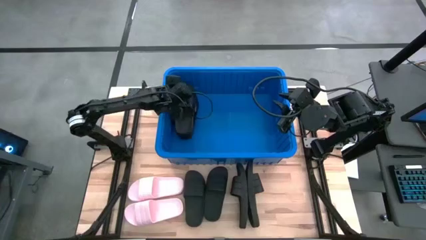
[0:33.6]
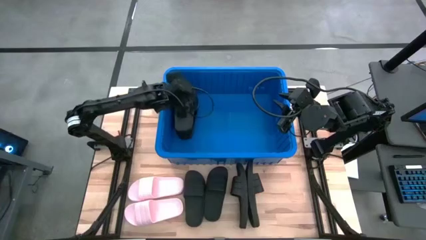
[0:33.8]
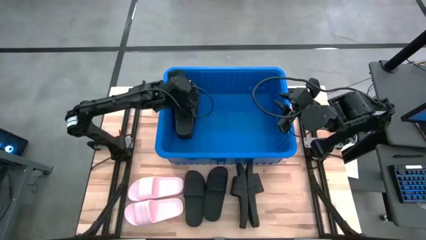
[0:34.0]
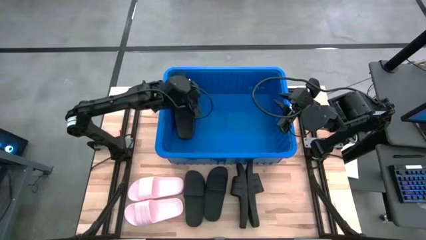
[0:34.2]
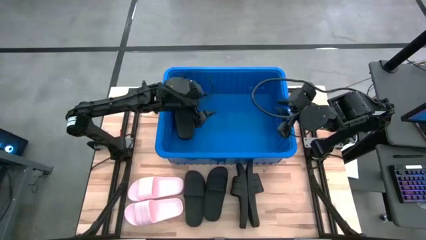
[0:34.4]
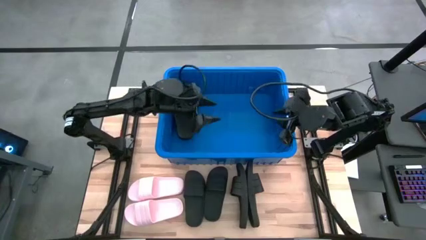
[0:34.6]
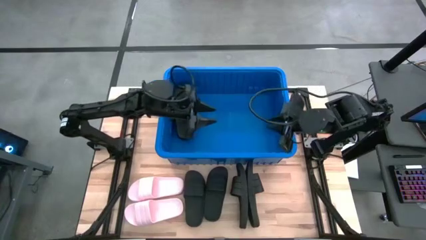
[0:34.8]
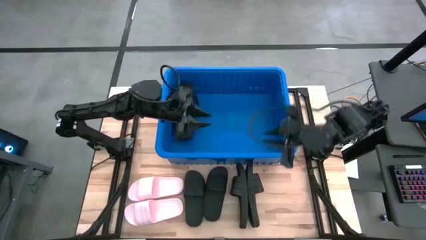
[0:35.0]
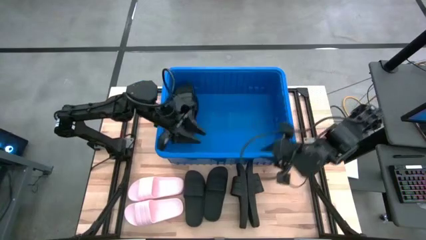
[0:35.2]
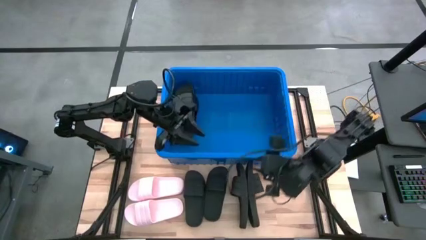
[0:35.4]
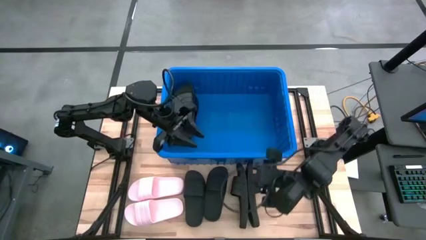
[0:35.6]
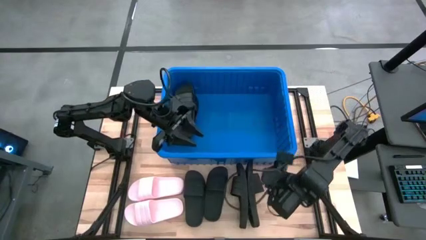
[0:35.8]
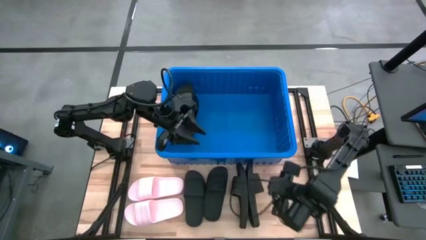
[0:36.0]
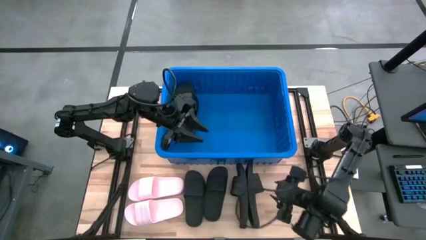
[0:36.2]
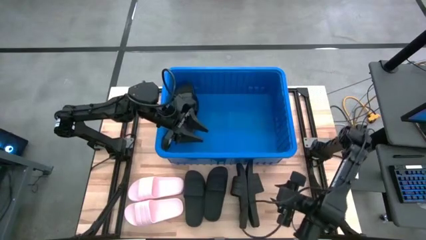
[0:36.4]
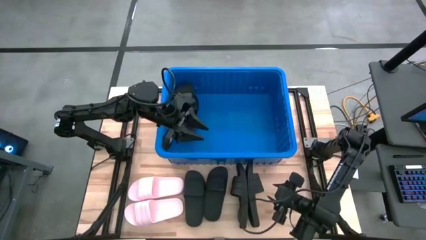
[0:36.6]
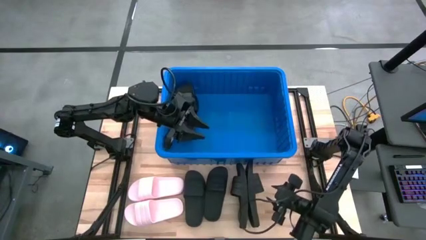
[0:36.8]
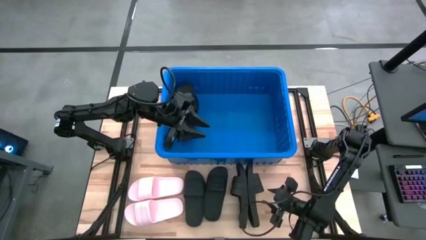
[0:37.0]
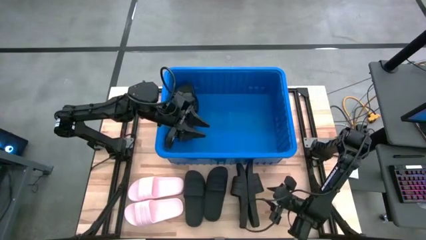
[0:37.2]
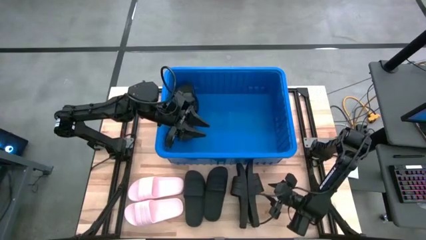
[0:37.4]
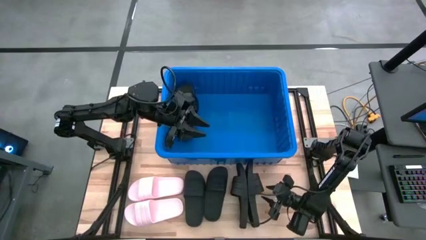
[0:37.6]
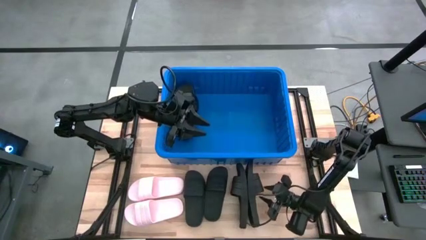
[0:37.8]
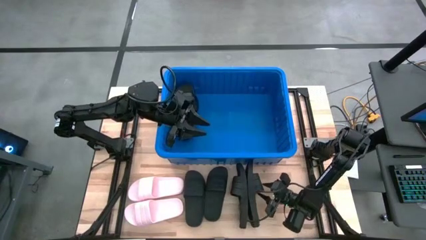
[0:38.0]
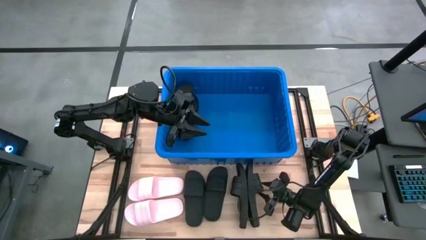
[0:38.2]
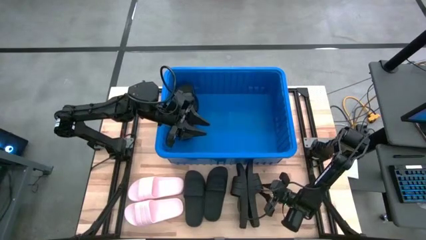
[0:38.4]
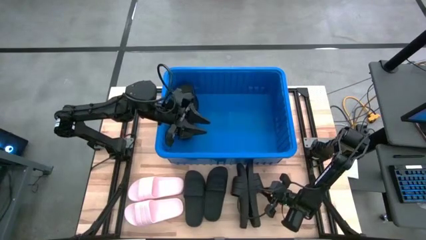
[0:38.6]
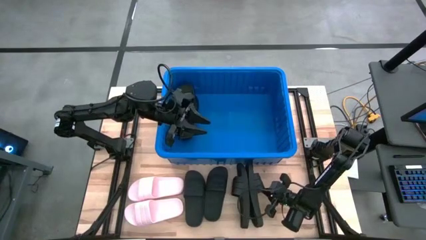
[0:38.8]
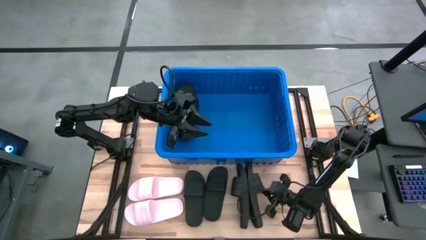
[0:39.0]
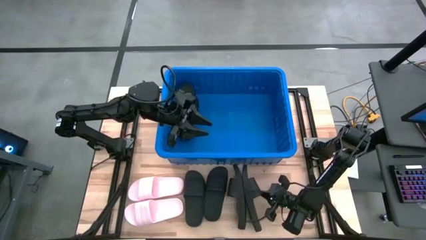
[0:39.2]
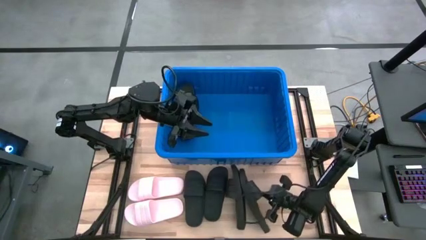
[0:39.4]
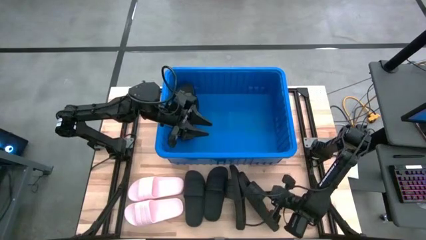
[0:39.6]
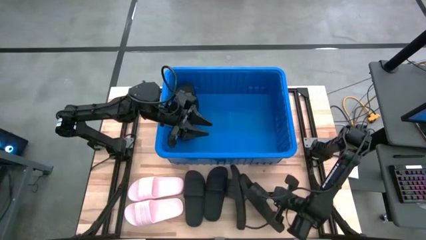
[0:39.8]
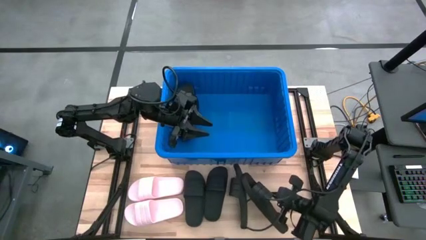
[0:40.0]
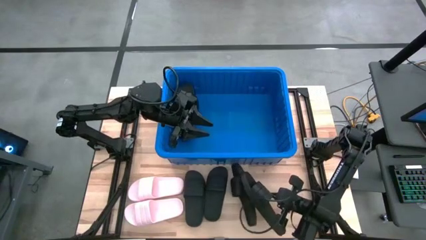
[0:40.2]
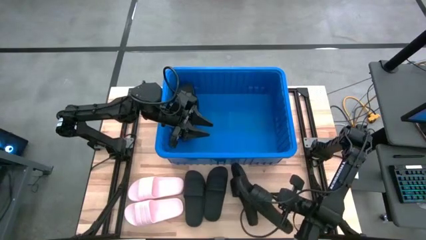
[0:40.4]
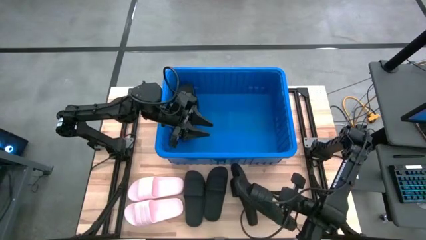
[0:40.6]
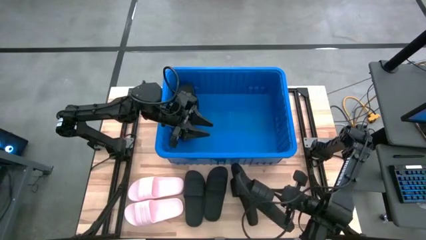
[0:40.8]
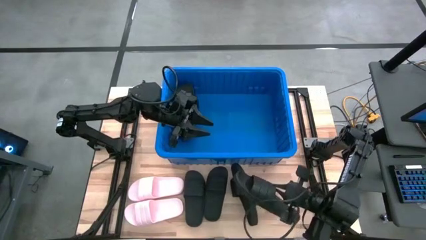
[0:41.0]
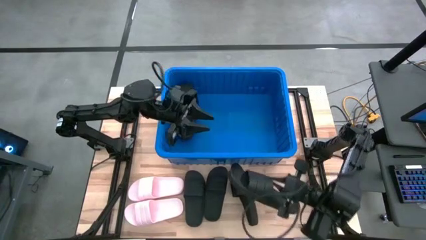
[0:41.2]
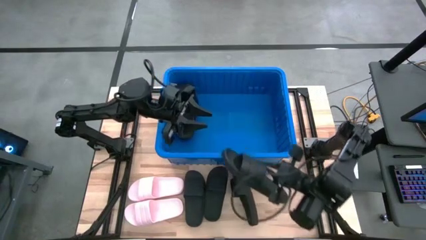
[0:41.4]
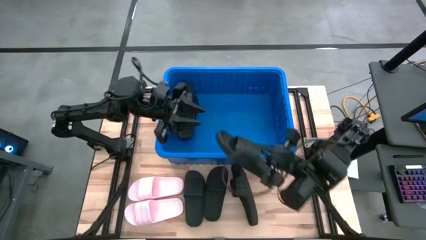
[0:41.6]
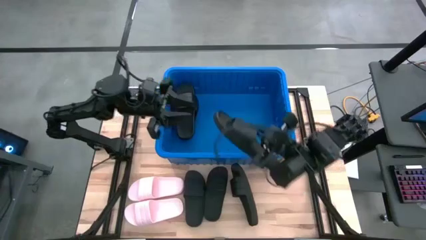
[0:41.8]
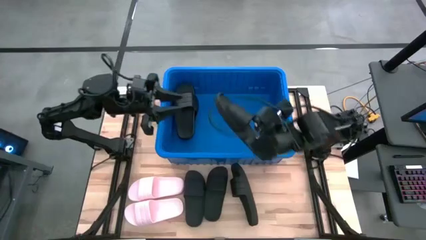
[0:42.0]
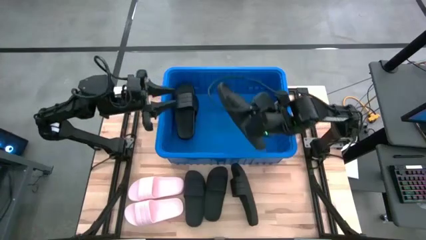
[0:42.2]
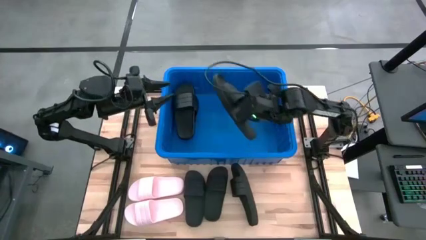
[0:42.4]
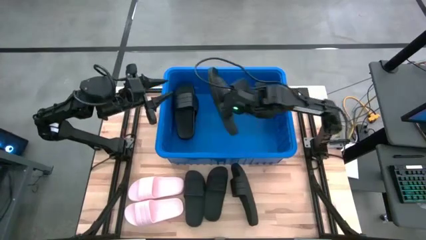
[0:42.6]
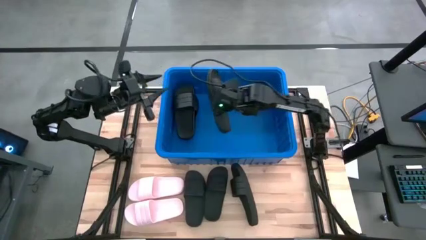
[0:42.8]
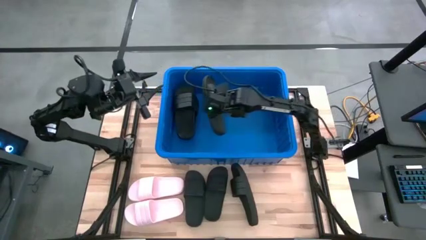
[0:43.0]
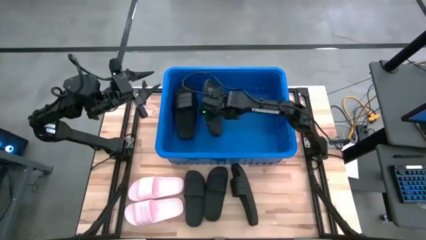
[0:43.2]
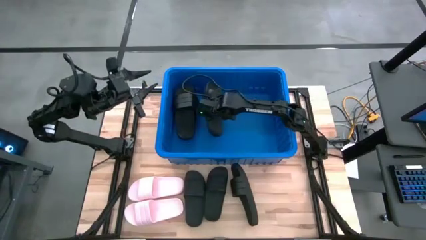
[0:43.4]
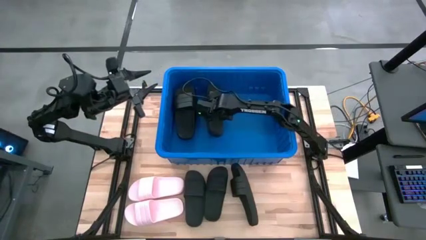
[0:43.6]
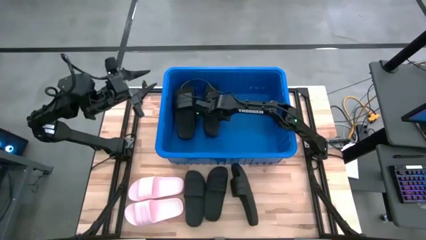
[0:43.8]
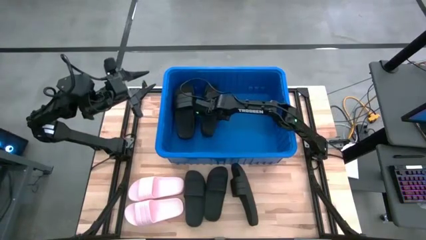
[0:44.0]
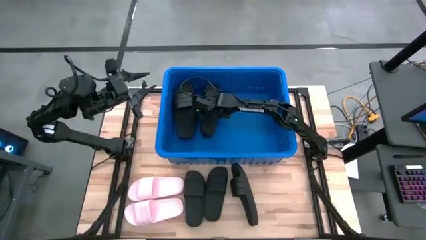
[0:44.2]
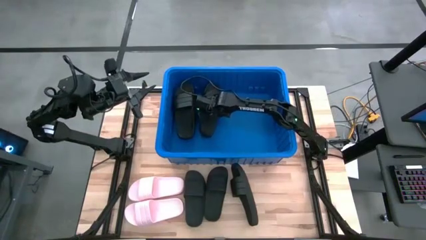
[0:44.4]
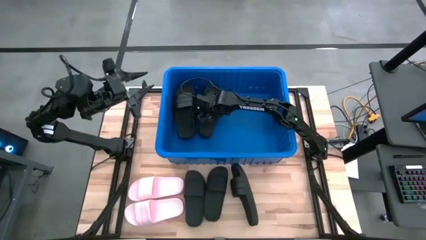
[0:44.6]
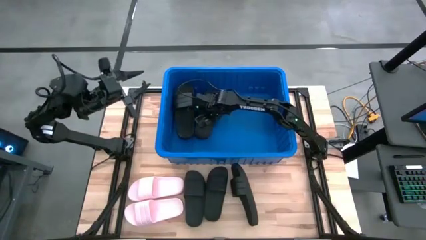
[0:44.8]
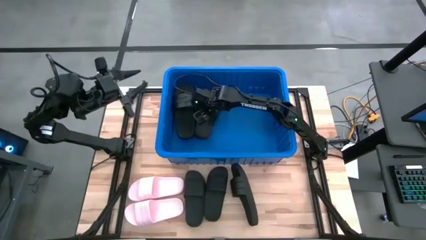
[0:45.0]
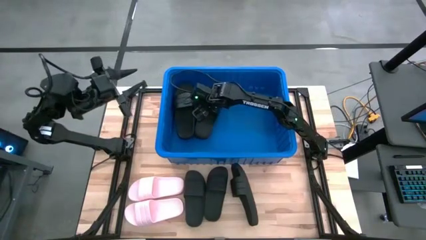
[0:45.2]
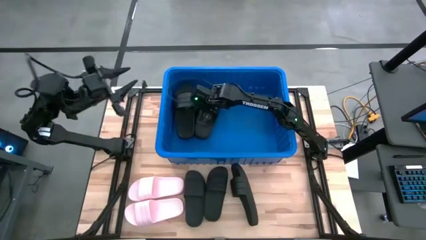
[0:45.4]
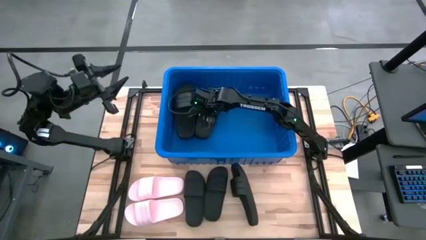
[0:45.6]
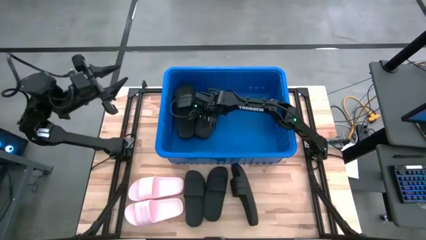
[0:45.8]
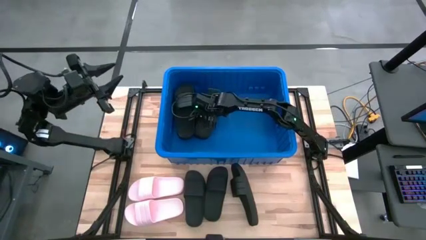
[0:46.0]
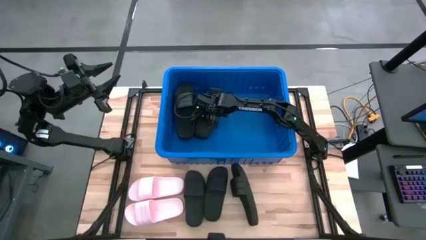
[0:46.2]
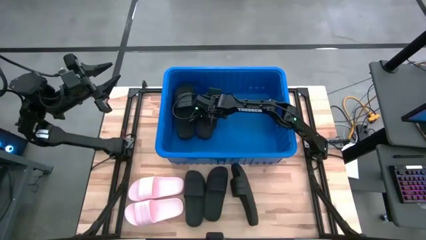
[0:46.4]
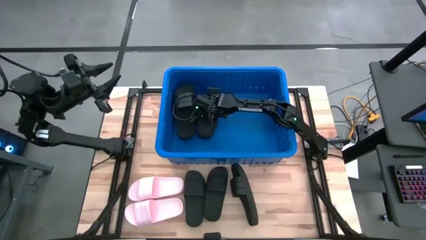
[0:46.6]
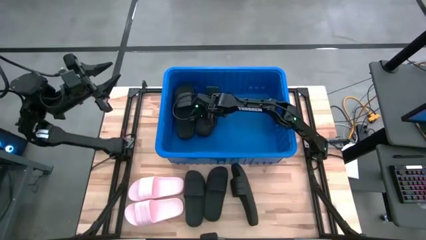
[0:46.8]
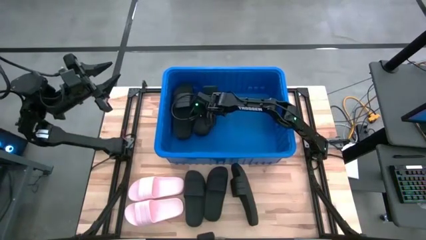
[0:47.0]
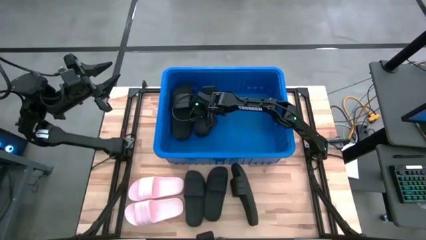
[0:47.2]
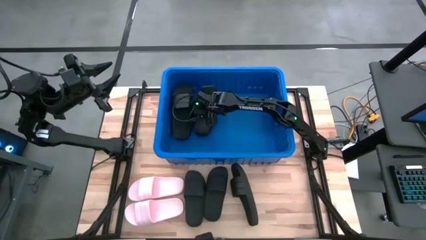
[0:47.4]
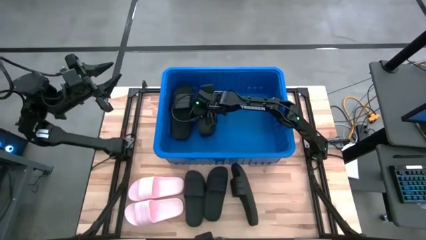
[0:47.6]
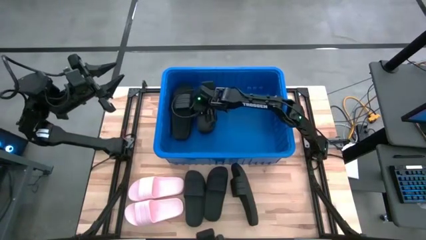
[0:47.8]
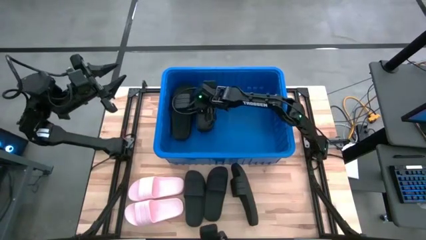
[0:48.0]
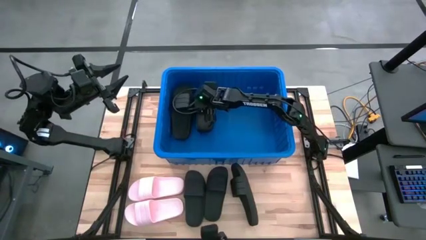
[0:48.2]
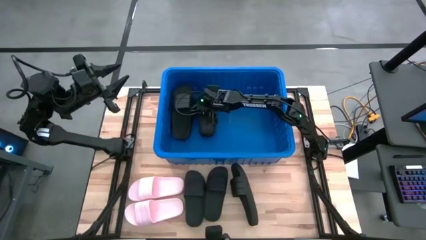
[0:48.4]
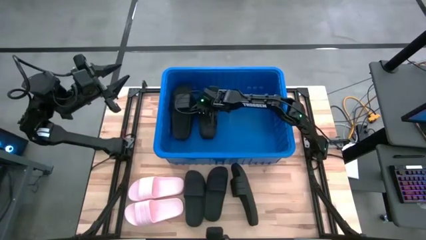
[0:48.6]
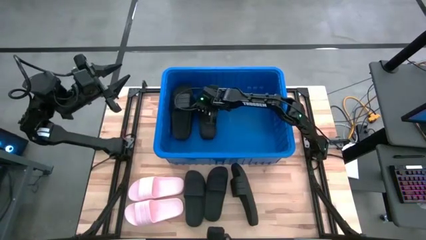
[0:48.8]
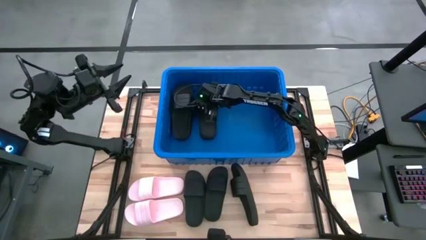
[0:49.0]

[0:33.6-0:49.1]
Task: Pick and place slides into bin
Put the black slide into the blue organizer bin
